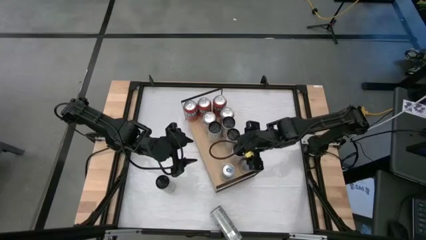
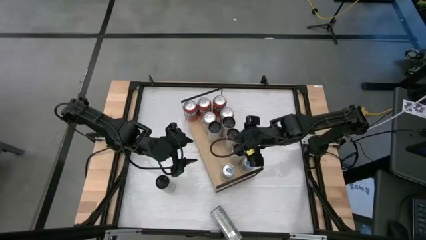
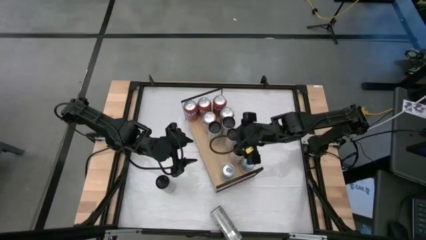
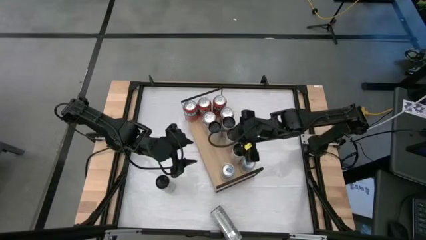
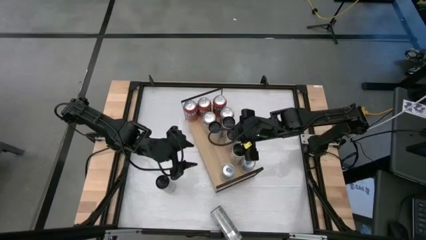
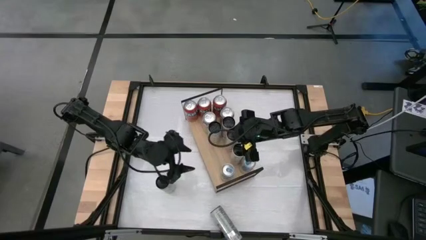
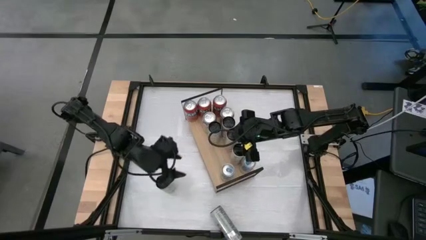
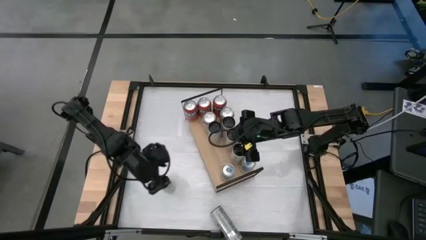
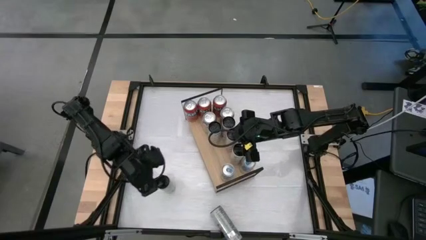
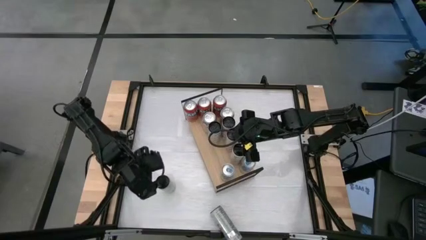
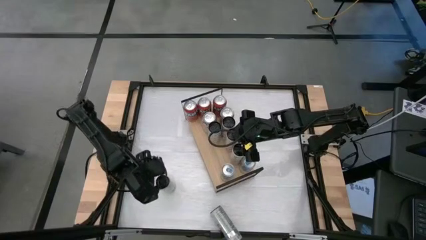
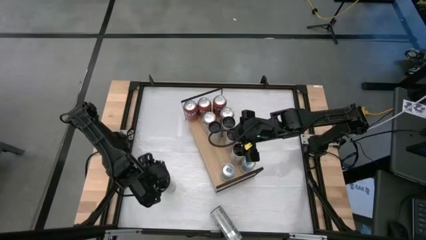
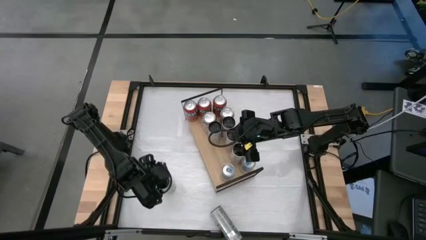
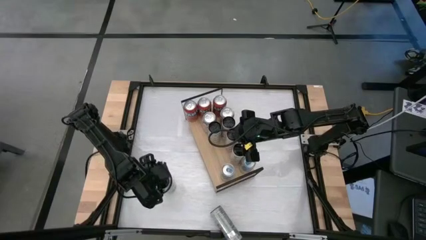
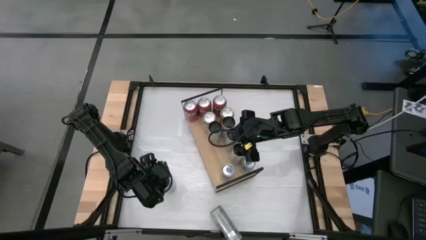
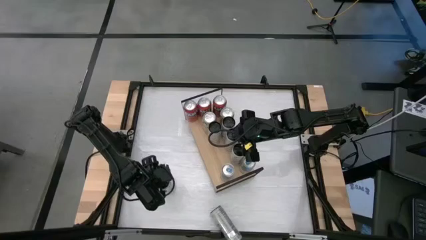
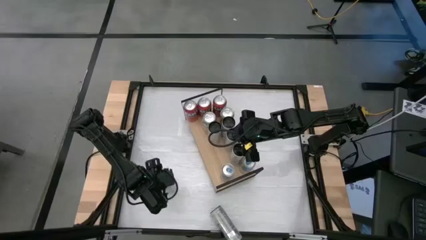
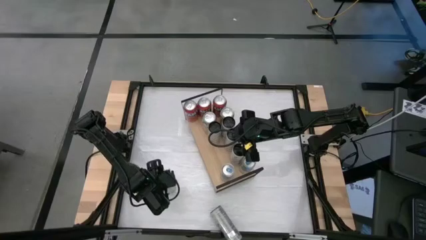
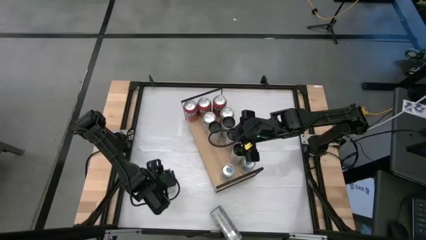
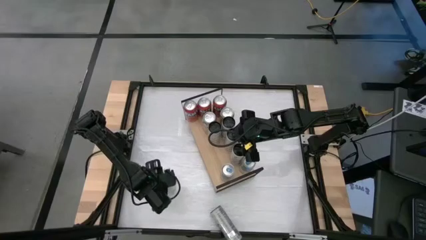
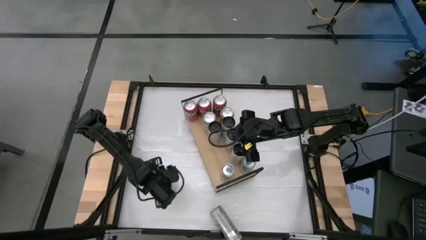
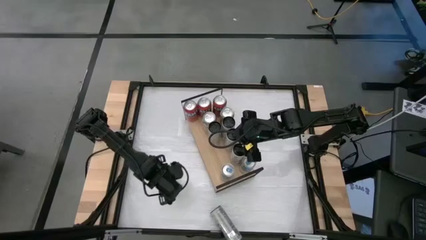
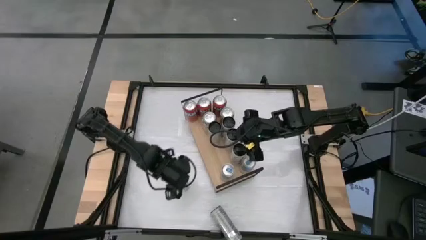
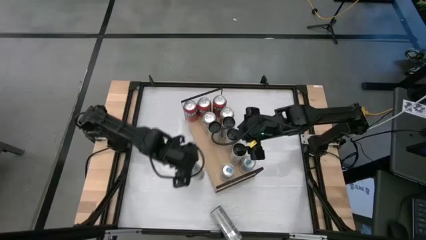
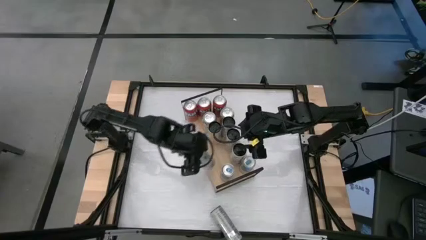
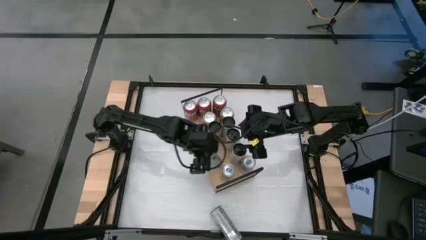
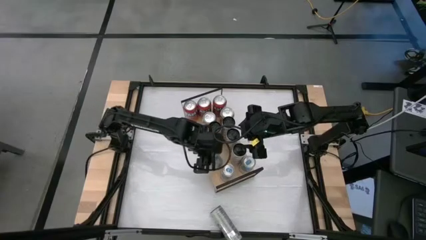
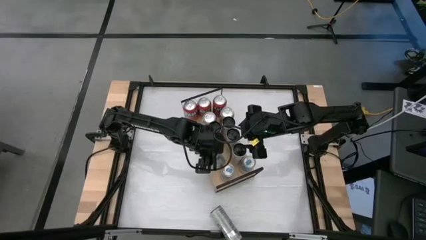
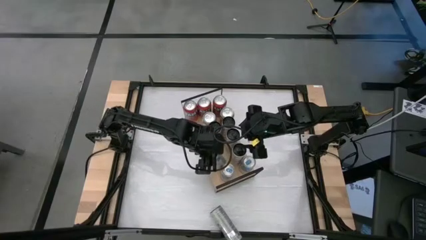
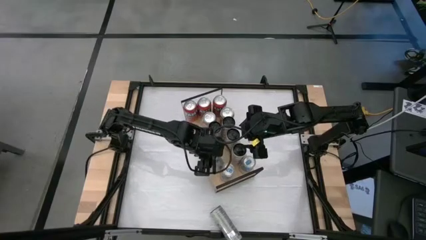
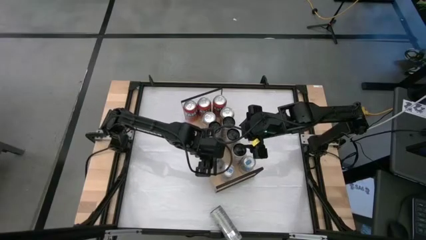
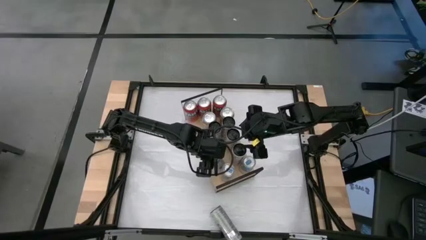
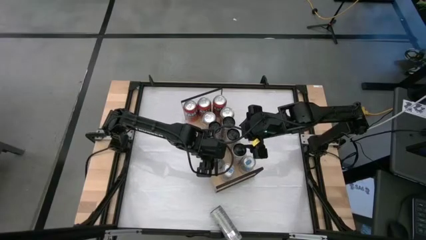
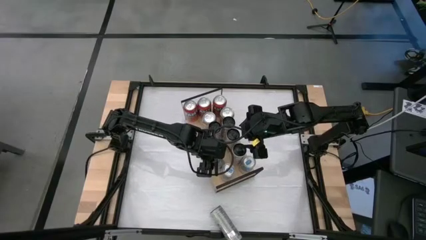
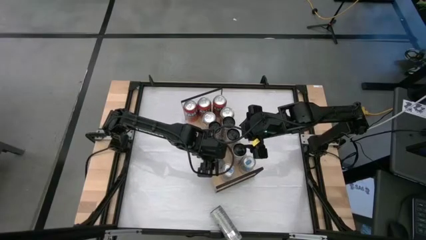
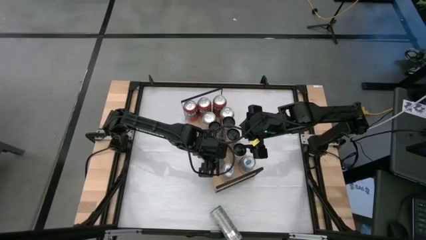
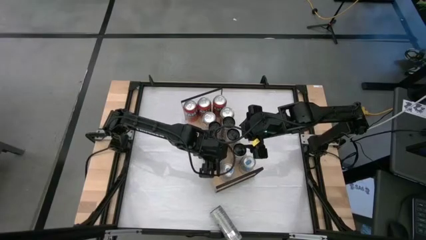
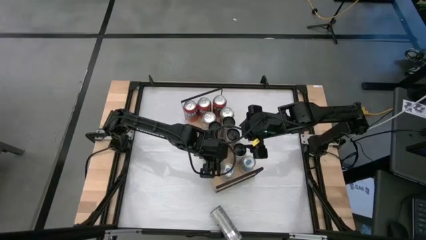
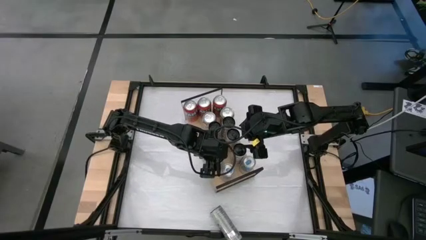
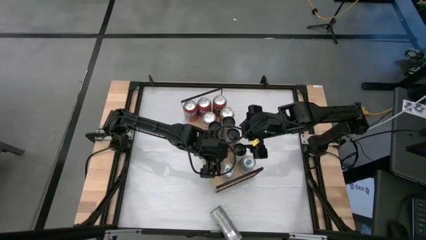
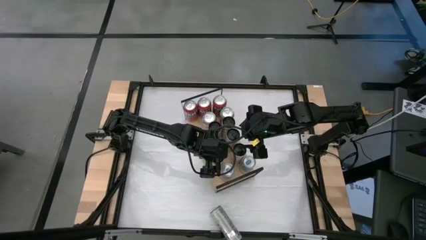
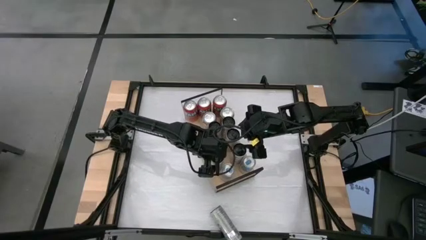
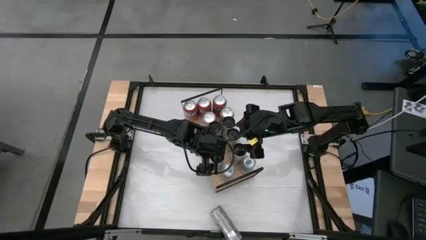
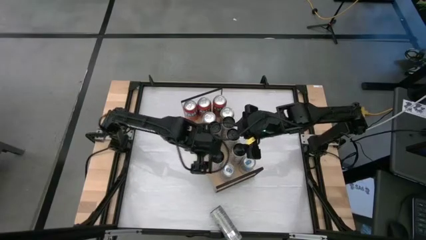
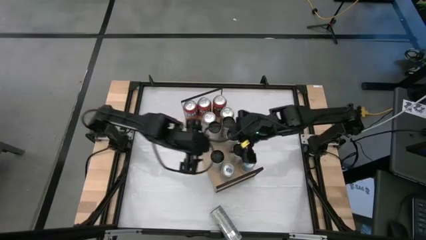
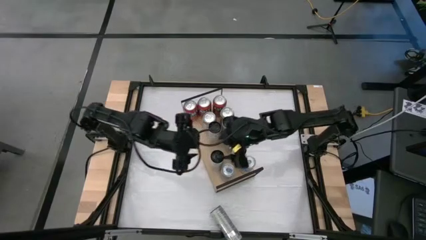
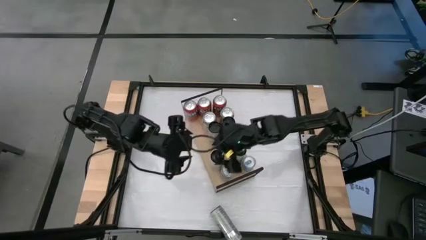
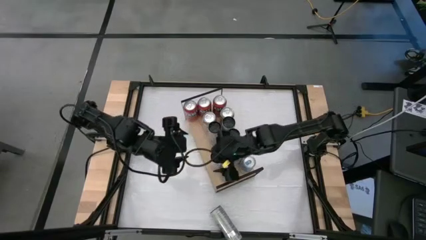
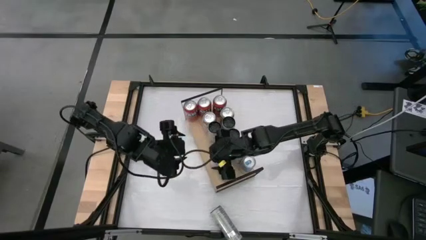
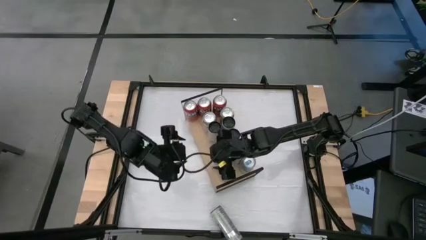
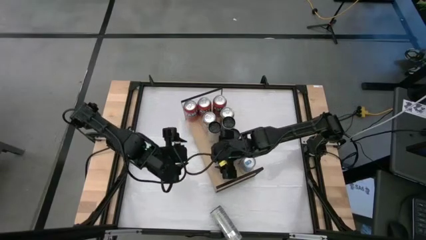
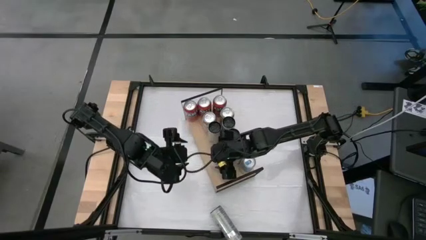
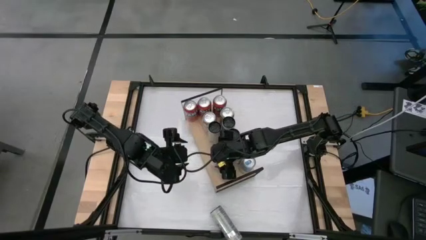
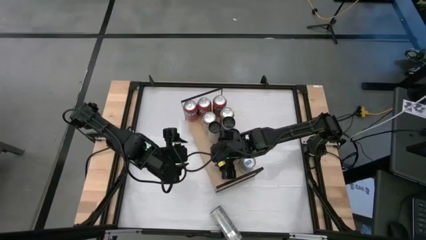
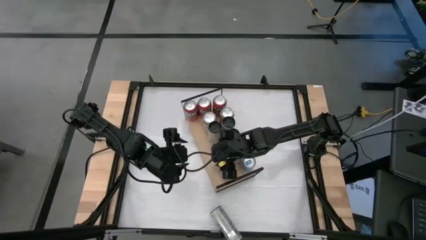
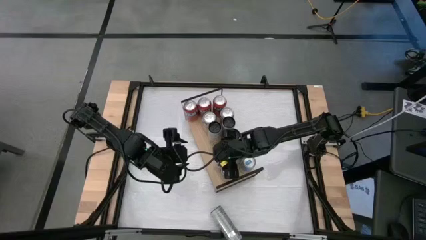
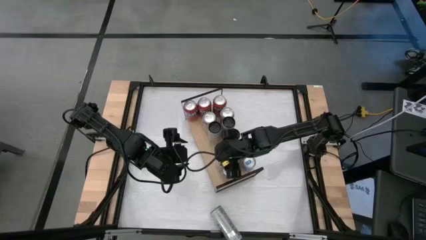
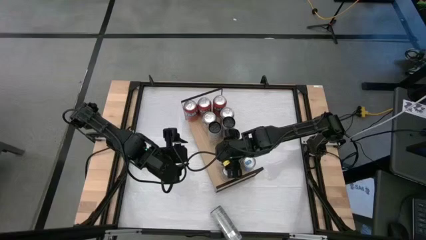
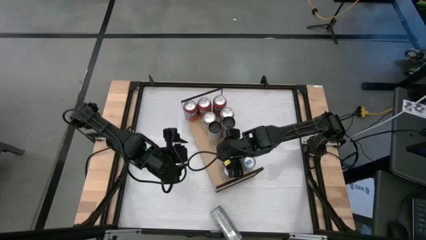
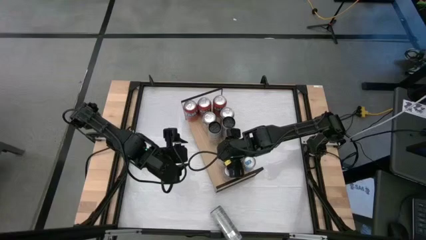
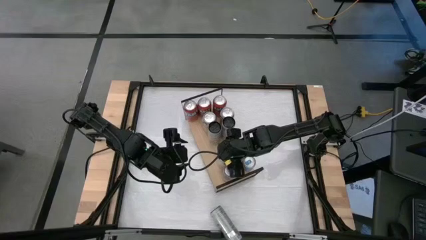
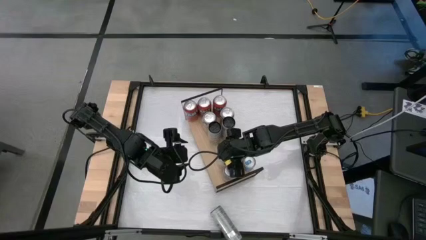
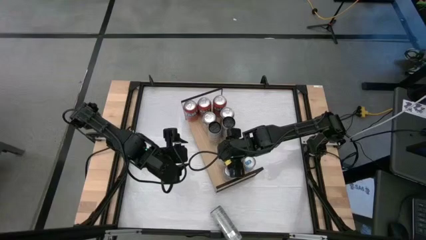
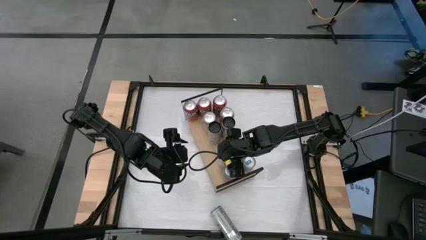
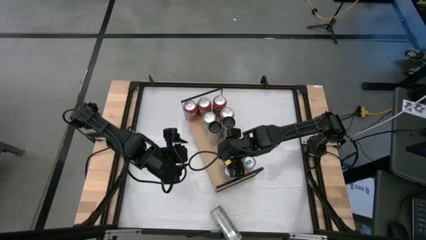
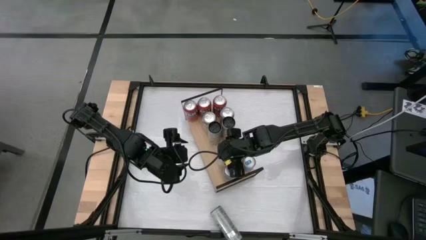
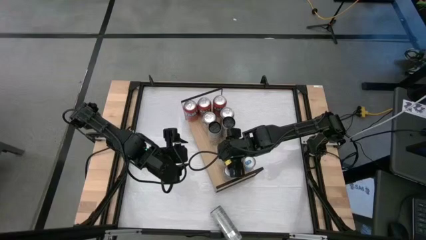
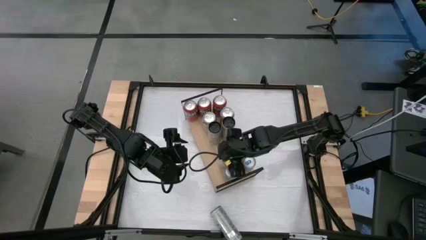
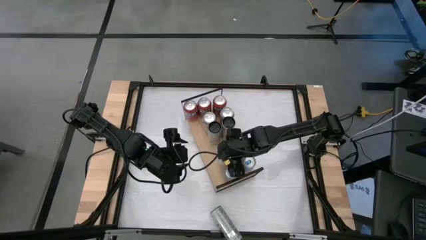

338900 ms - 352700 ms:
Task: Place canned beverage on shelf
Align the red soda can with the other red soda can

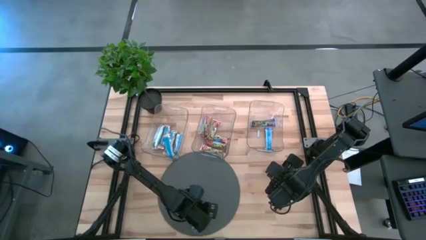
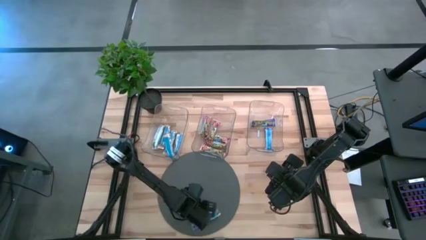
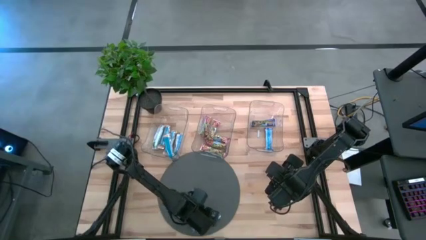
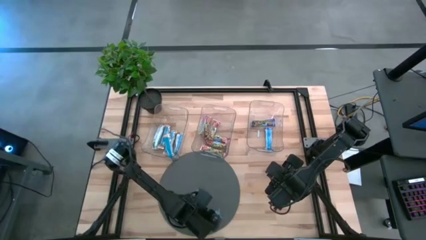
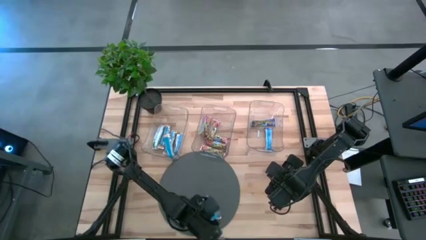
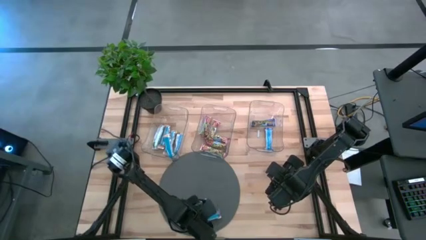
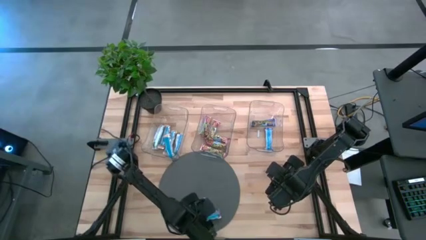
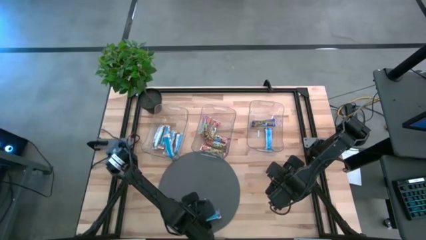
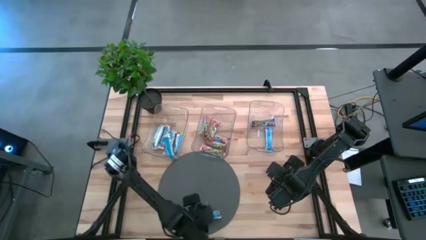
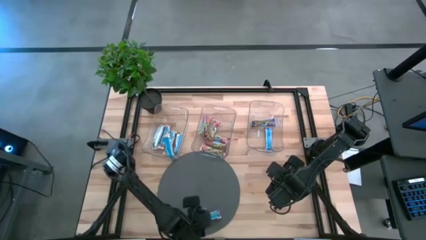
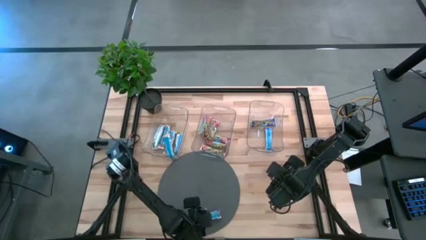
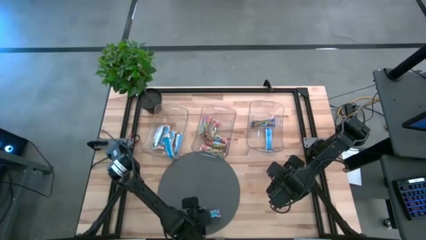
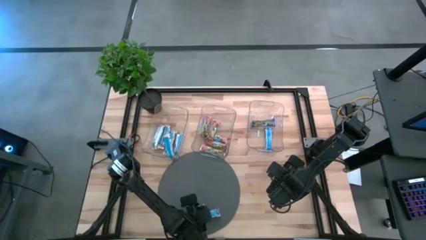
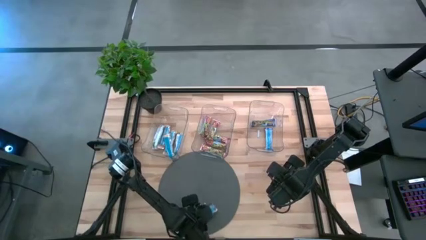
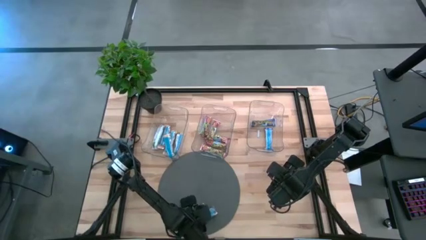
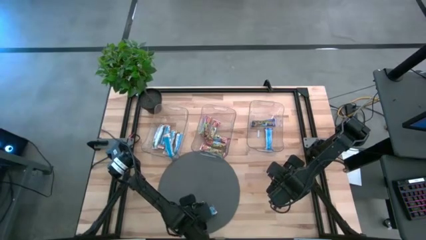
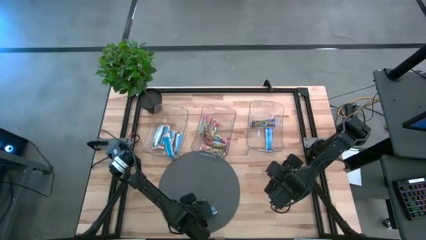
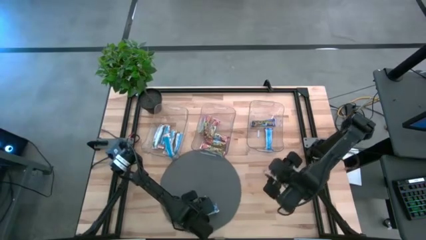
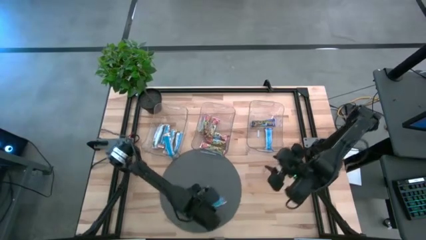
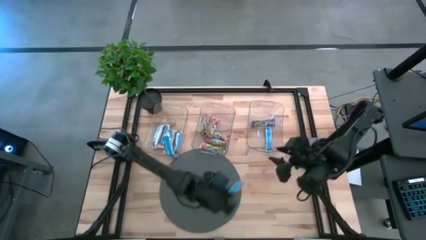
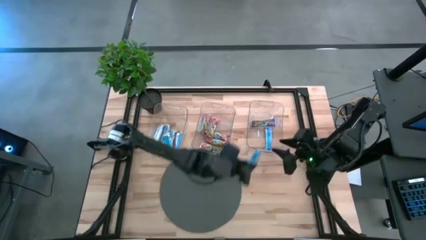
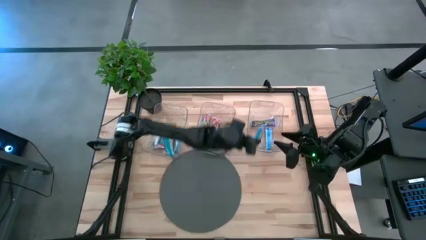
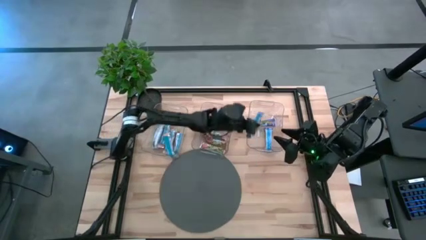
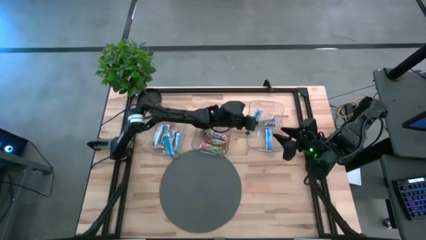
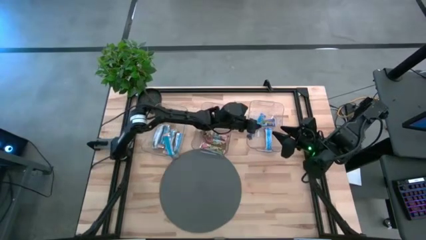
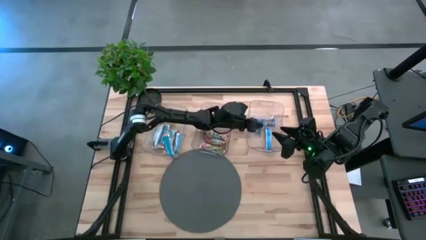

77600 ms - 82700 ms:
Task: Pick and place Granola Bars by type
Put the blue granola bar into the right transparent bin
